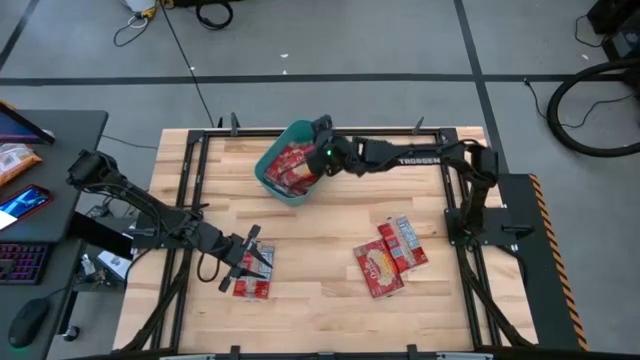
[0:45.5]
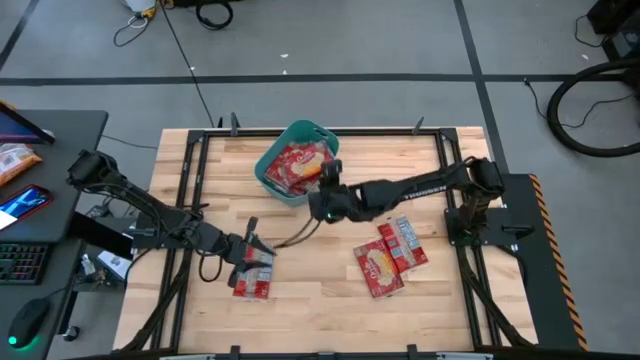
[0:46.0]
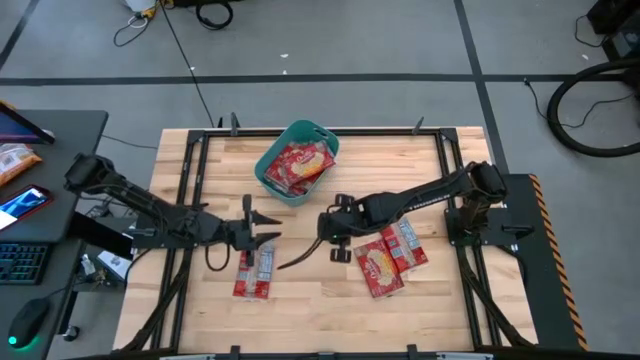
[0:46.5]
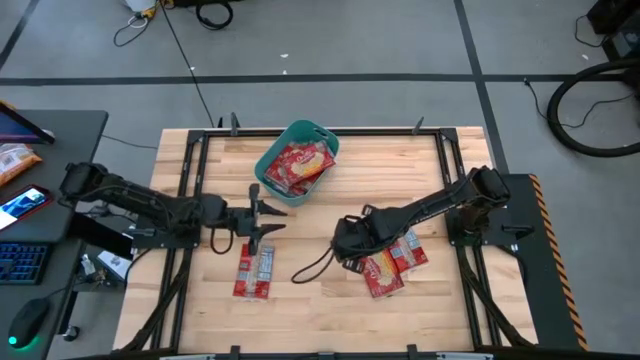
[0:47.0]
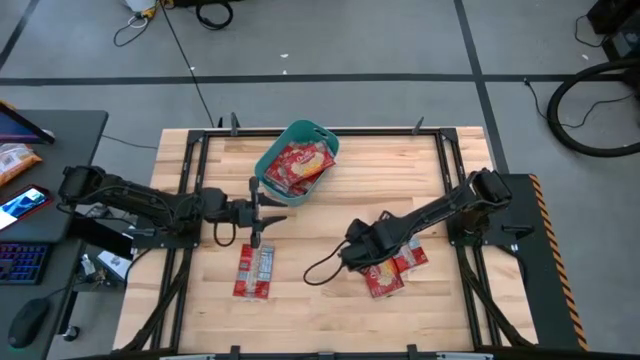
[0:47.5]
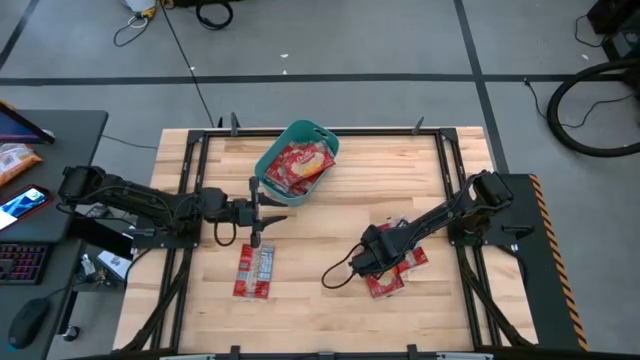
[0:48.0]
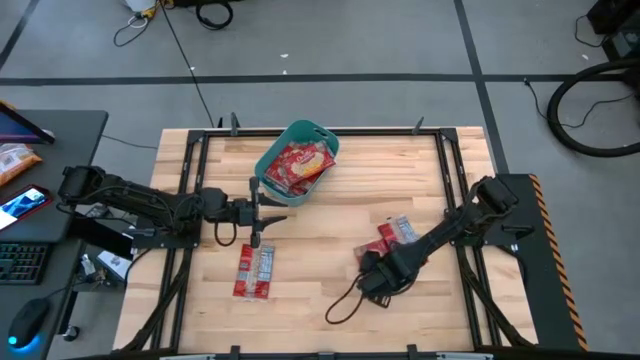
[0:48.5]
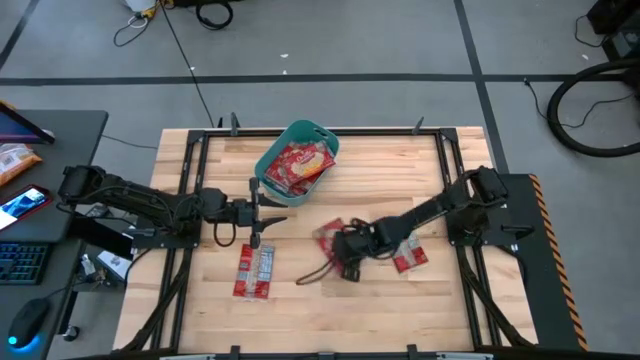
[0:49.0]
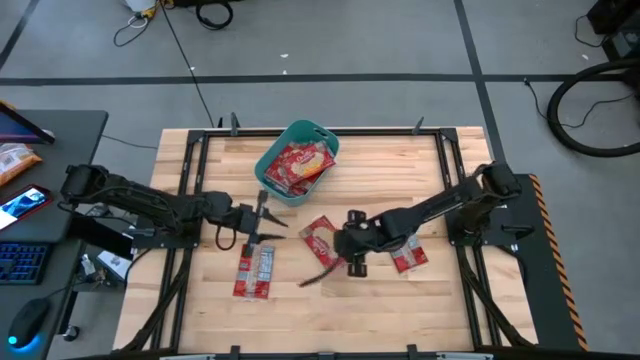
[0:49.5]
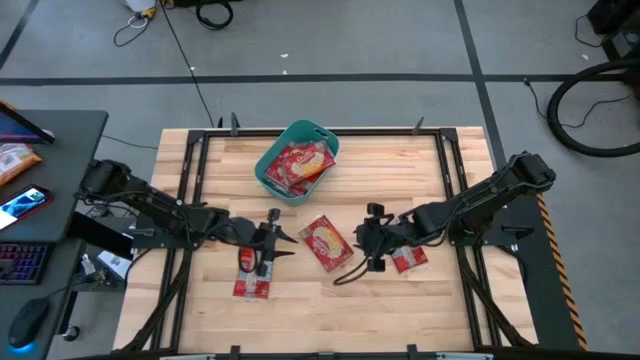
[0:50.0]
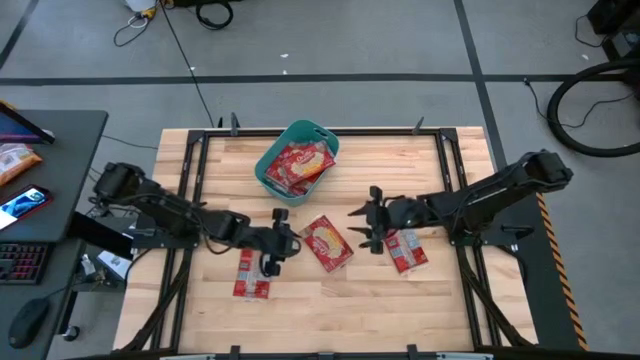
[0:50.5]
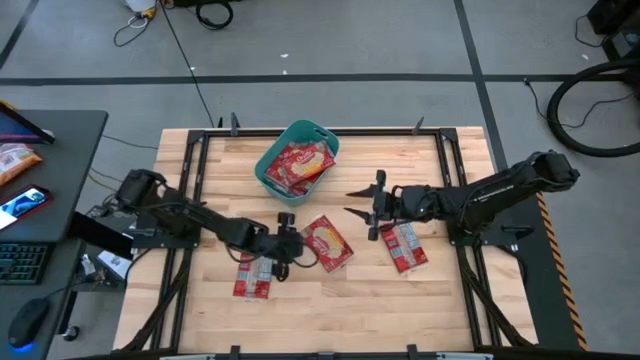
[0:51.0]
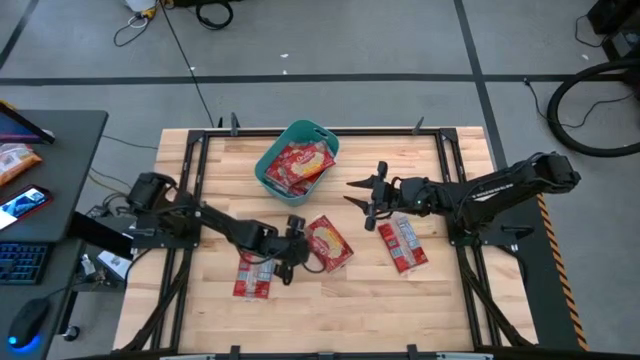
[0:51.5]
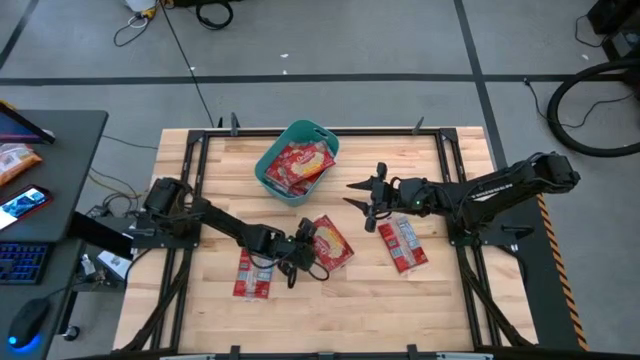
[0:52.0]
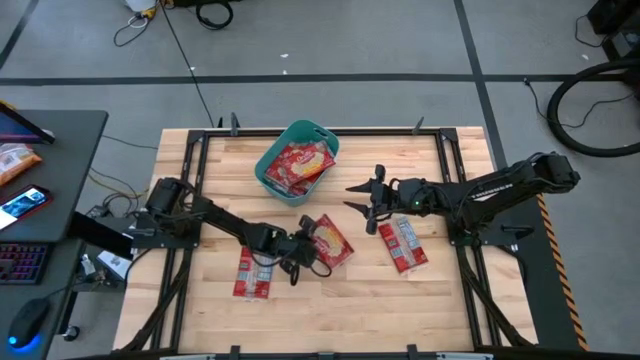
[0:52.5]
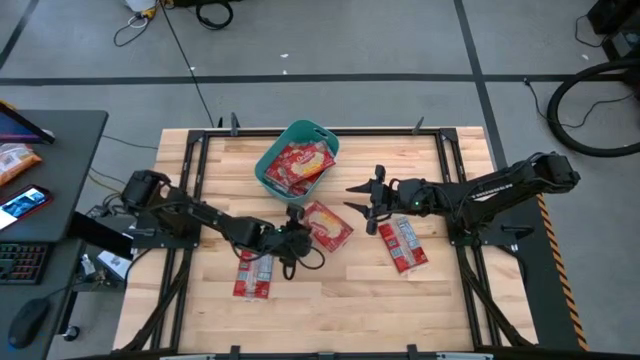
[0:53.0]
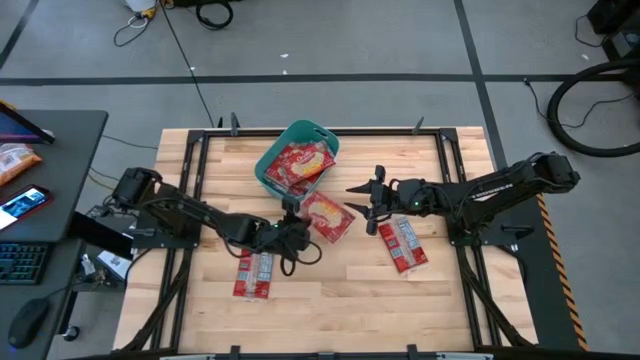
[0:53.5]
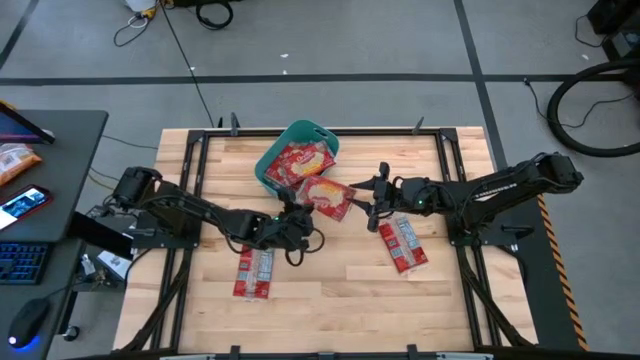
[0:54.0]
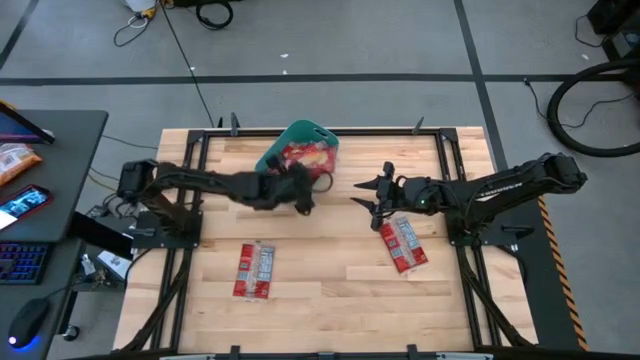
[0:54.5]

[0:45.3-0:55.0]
Task: Sort popcorn bags into baskets
Put the red popcorn bag into the blue bin

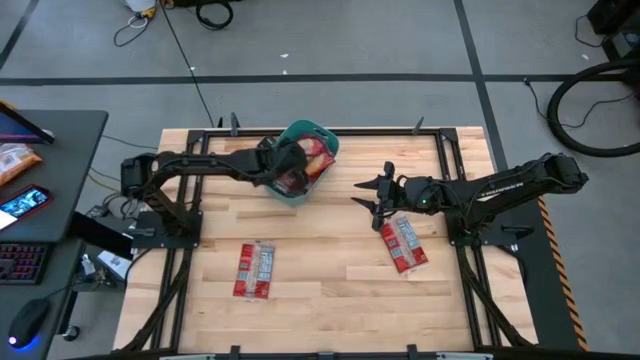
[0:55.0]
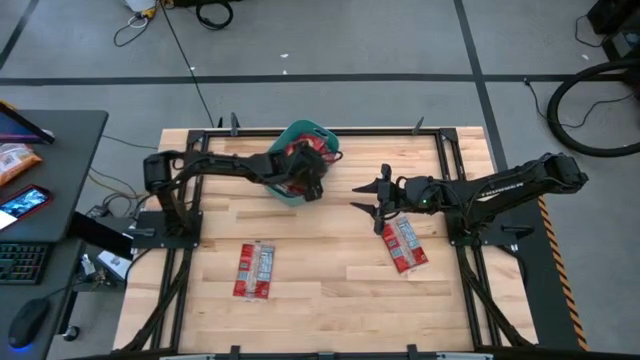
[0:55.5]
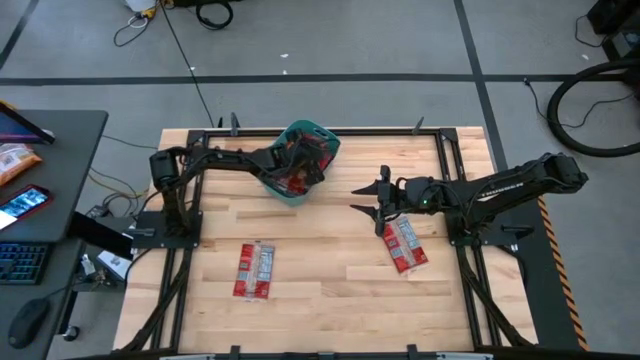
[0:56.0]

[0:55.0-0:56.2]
Adjust the red popcorn bag in the blue bin

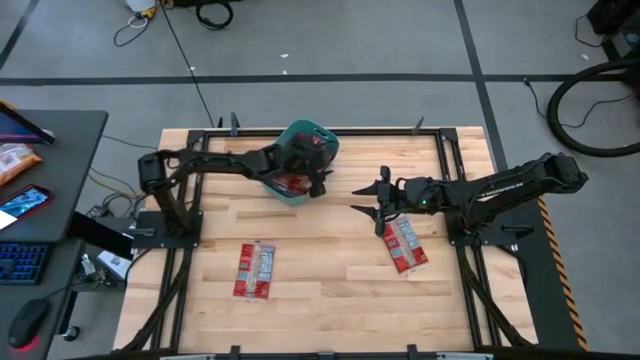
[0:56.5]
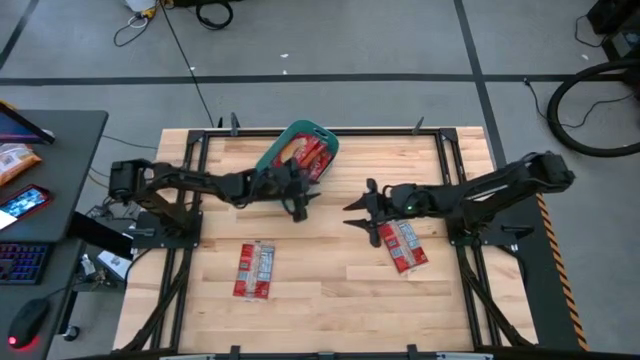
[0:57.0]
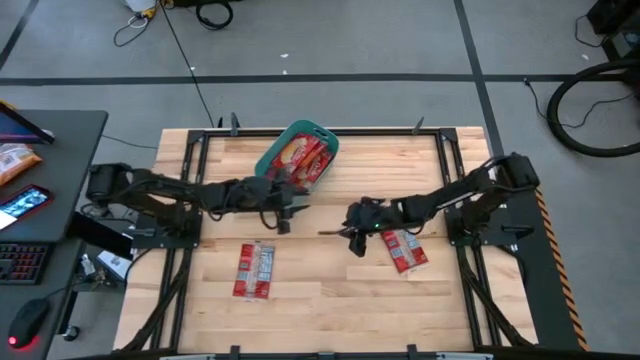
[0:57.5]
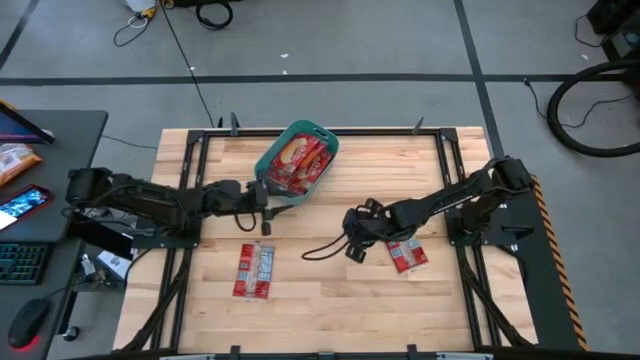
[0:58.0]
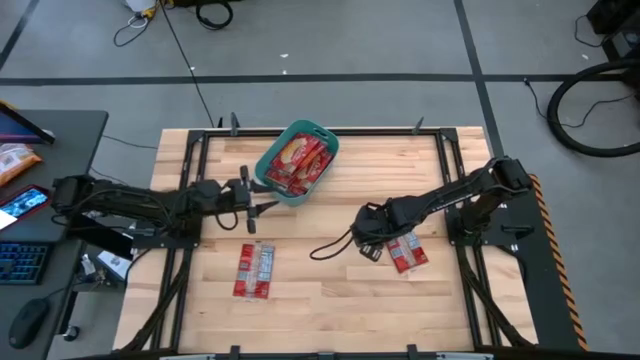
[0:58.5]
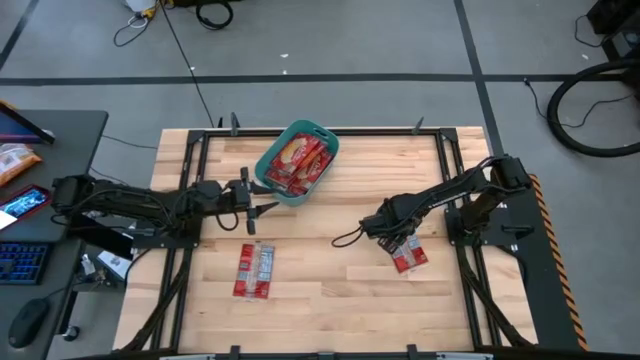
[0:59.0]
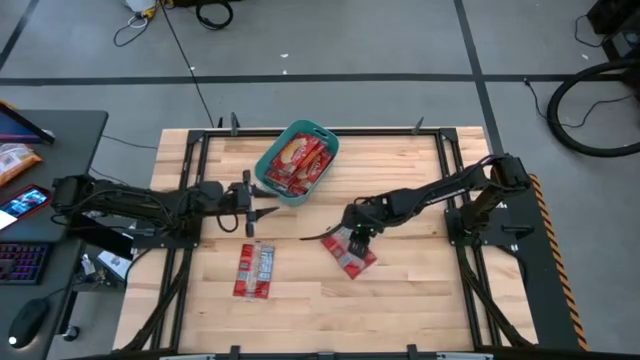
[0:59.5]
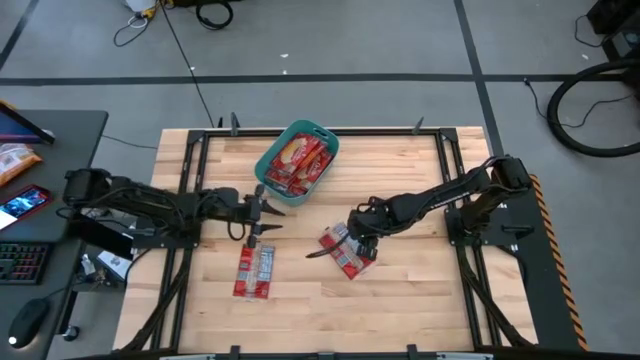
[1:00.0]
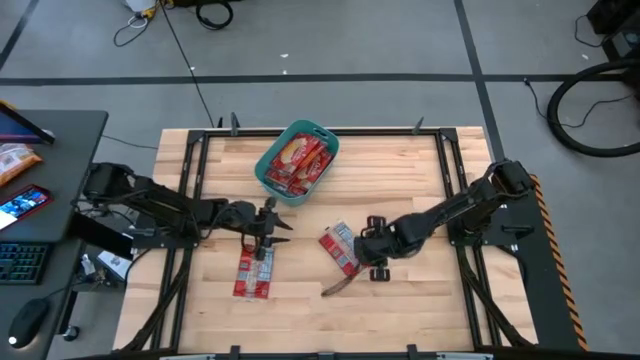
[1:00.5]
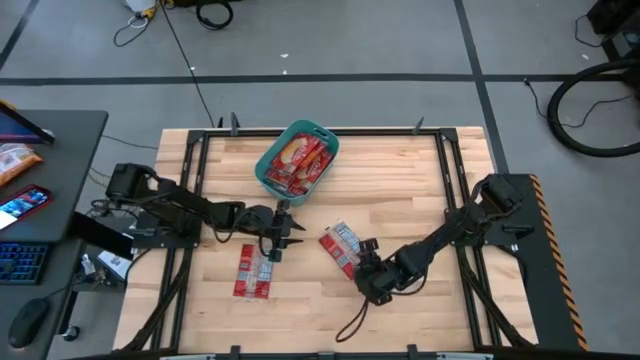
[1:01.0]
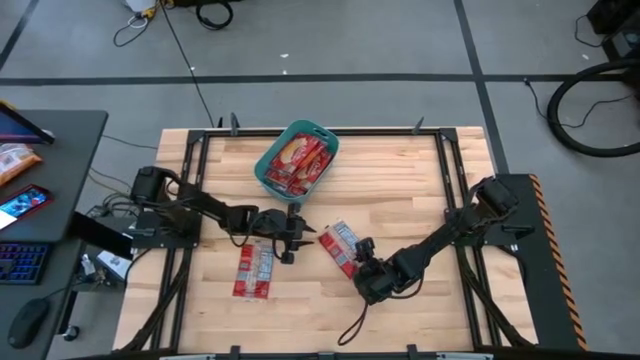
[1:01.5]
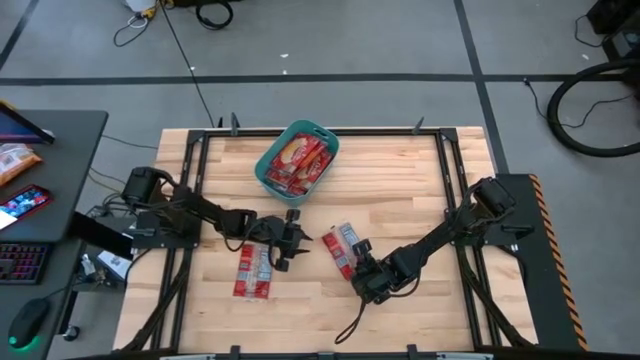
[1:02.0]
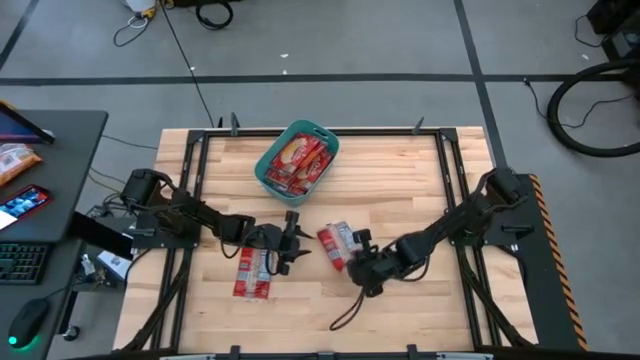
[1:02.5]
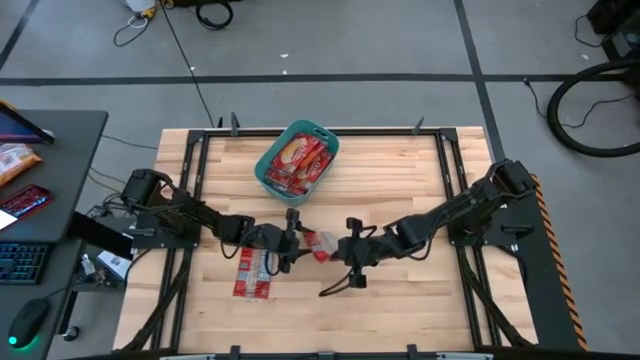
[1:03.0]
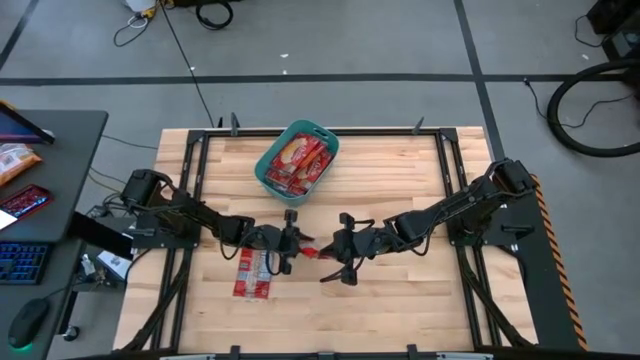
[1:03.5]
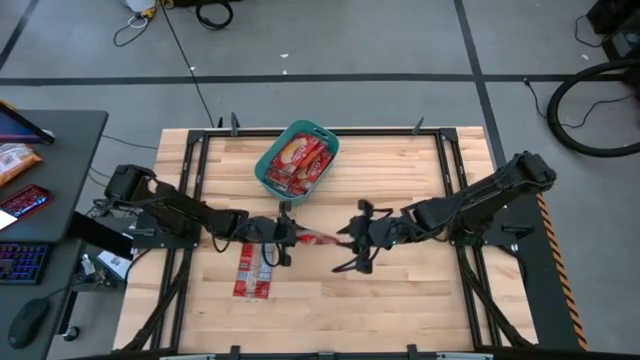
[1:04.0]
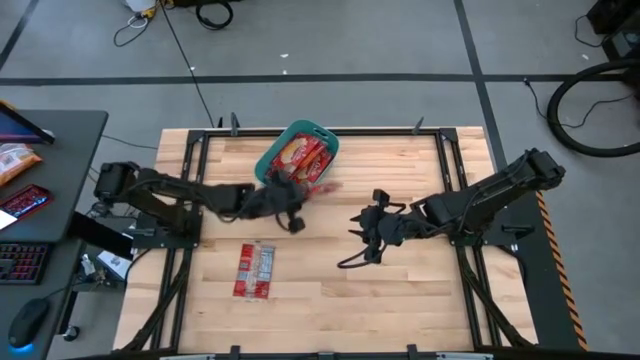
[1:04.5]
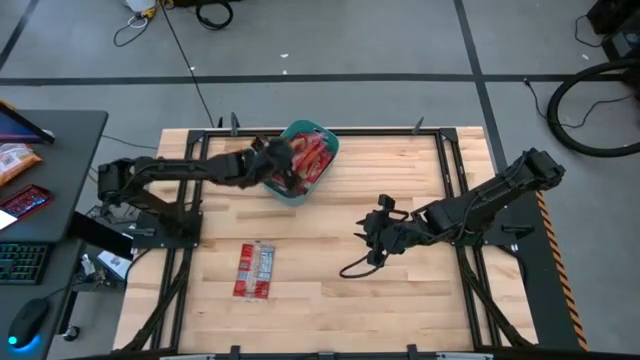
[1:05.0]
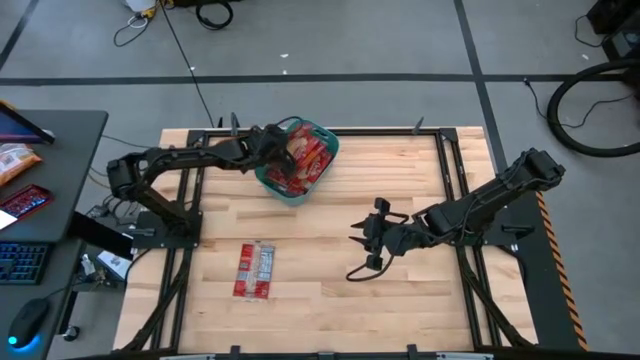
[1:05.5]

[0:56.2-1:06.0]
Put the red popcorn bag into the blue bin

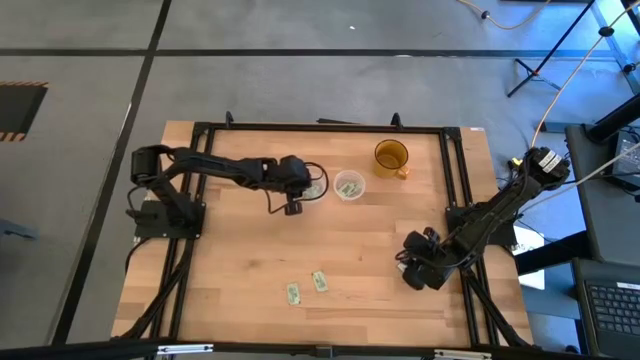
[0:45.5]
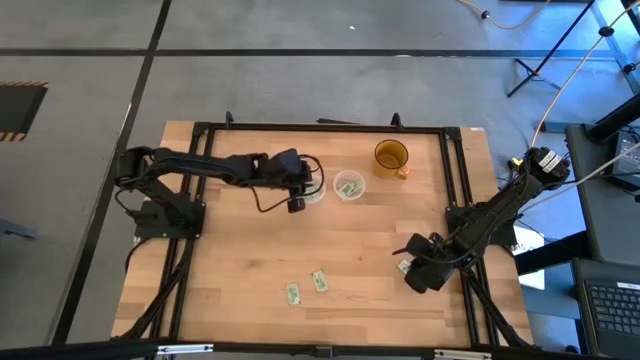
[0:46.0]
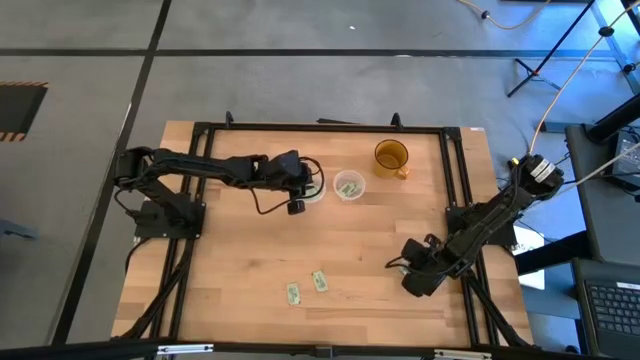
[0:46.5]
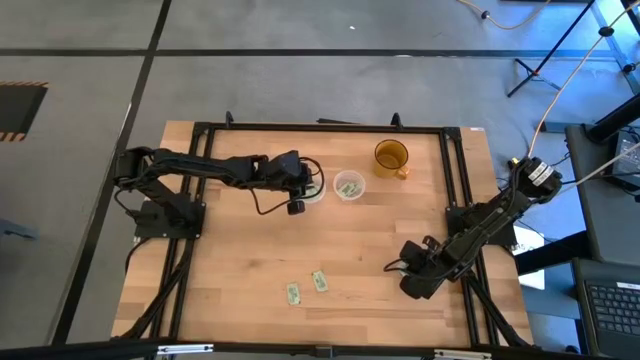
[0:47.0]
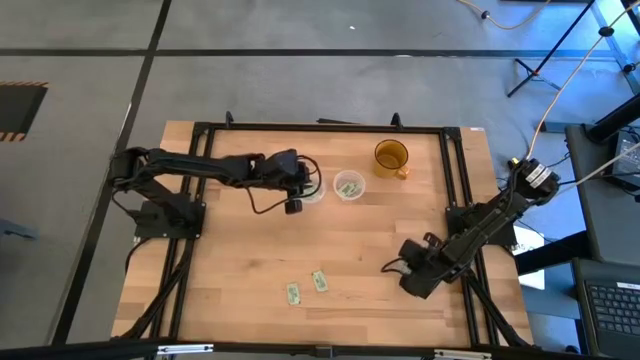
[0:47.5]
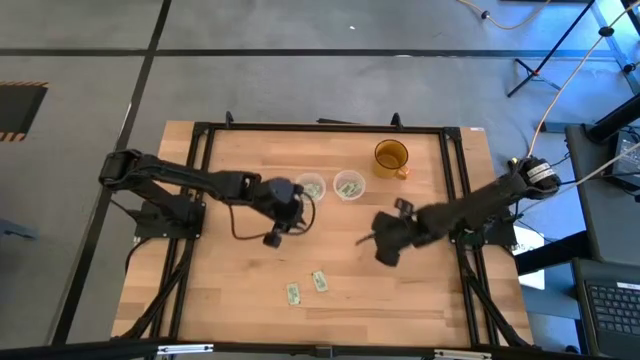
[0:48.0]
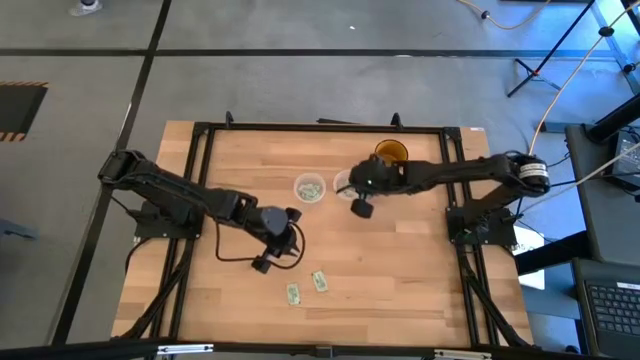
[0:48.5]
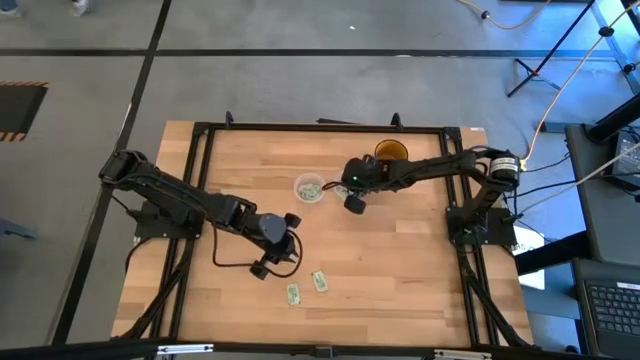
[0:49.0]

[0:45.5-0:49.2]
Task: Pick and place Stevia / Truvia into bins
Put the stevia packet into the right transparent container
